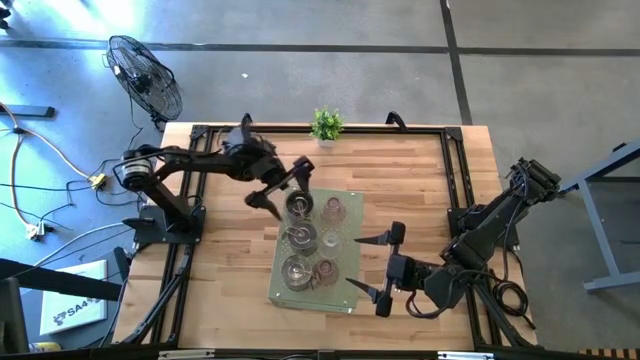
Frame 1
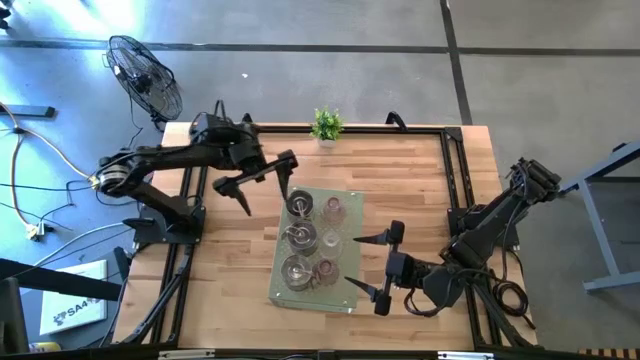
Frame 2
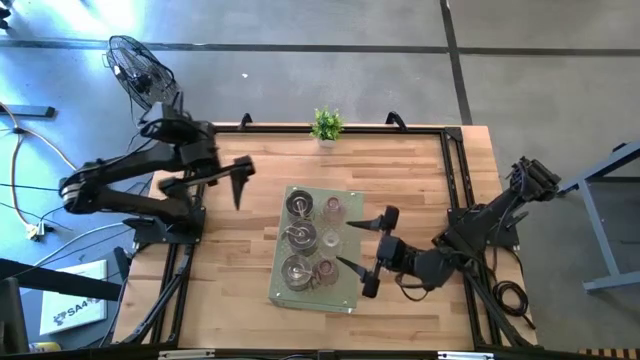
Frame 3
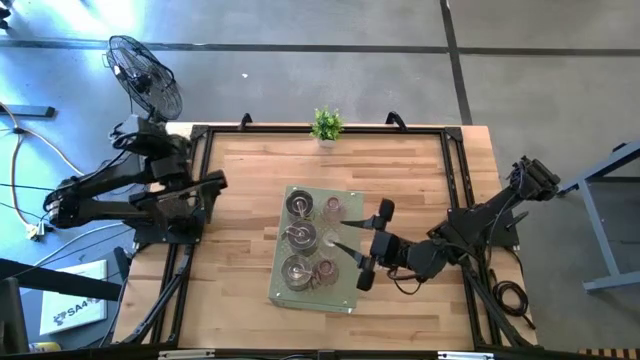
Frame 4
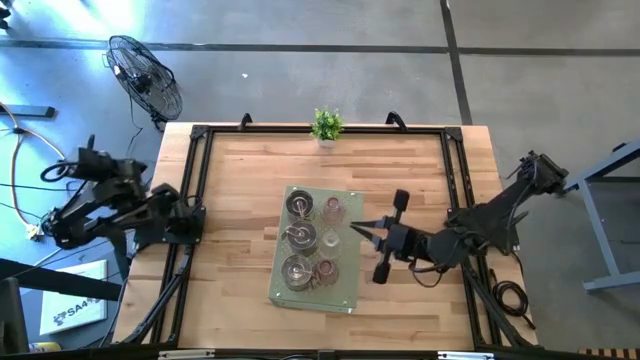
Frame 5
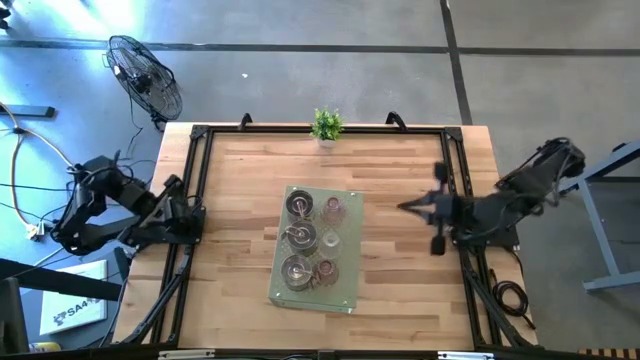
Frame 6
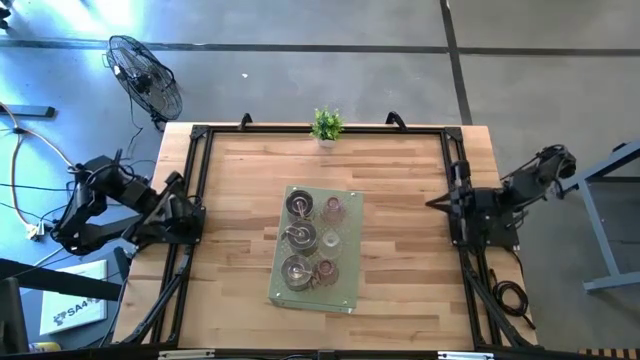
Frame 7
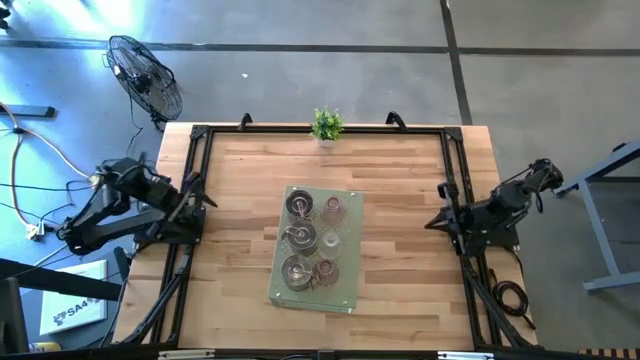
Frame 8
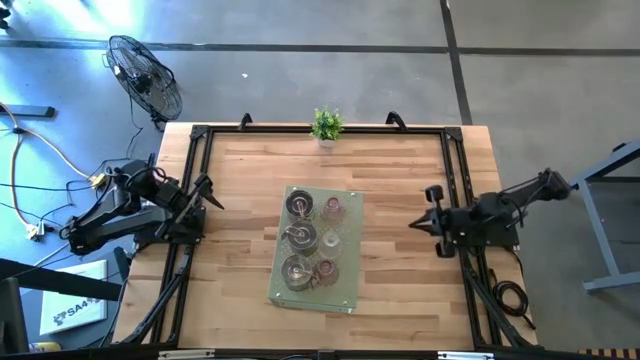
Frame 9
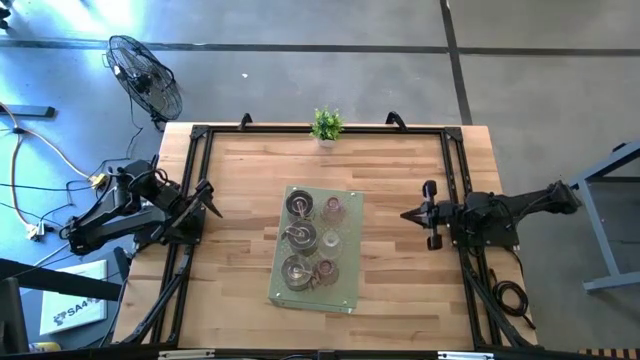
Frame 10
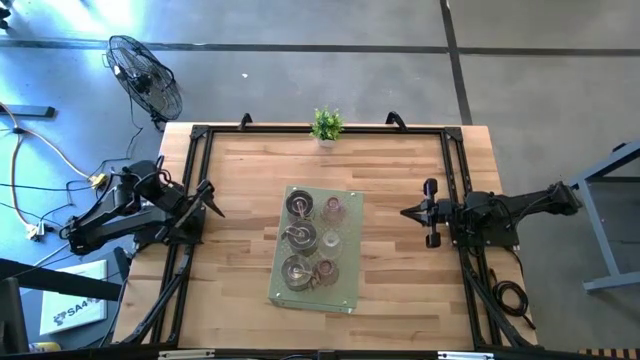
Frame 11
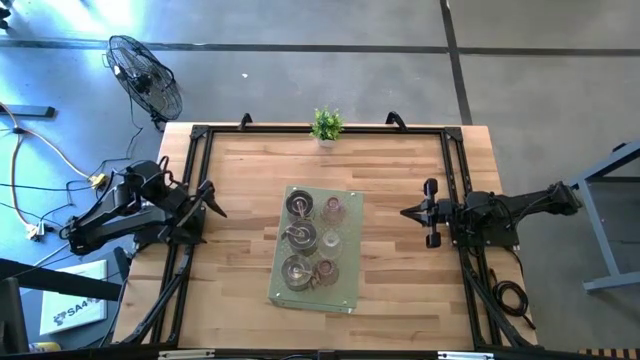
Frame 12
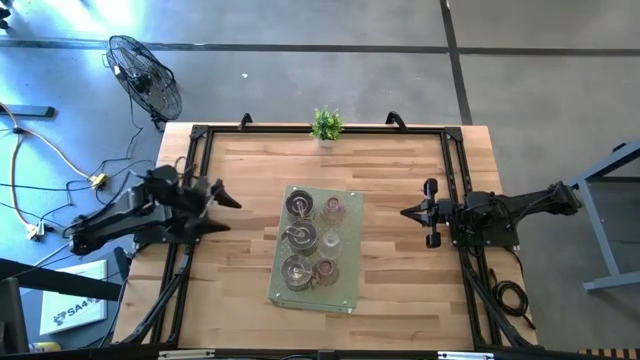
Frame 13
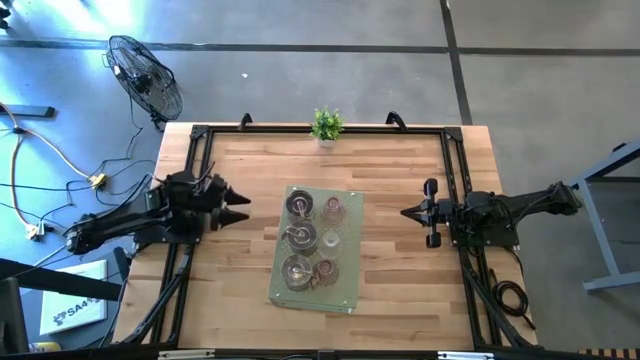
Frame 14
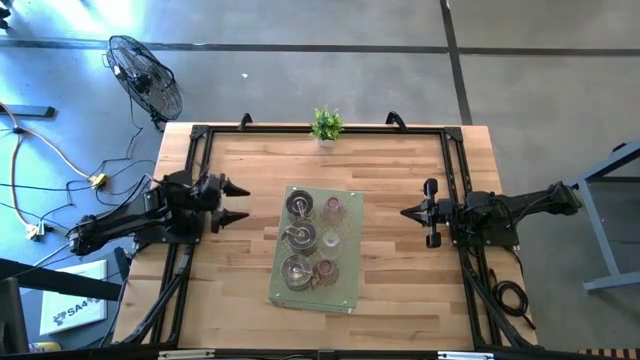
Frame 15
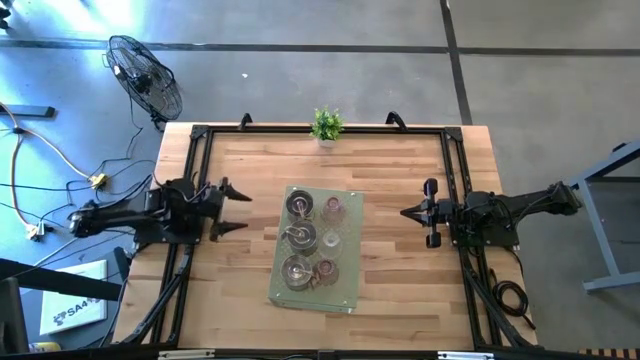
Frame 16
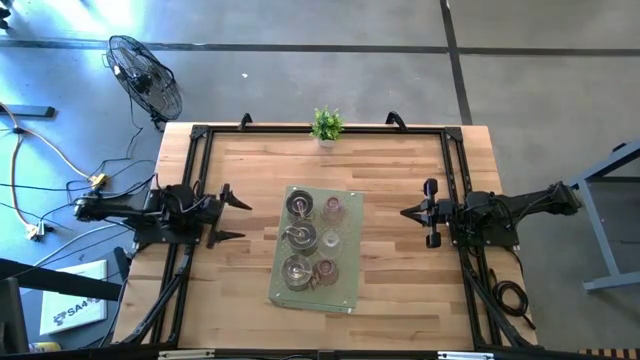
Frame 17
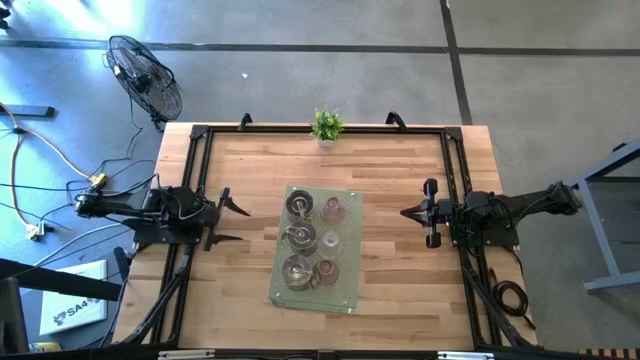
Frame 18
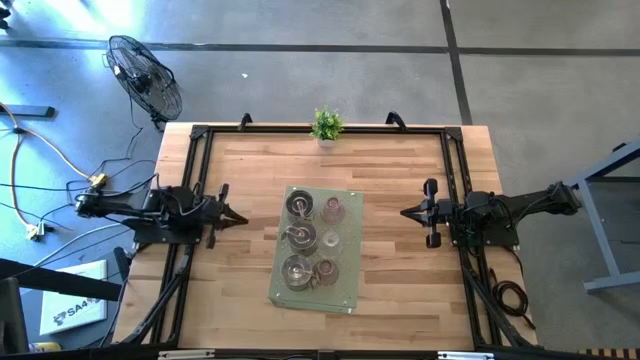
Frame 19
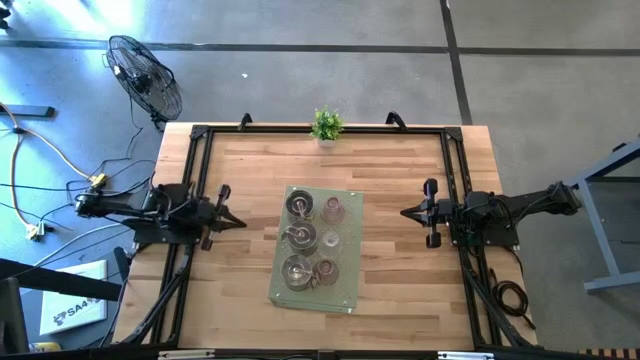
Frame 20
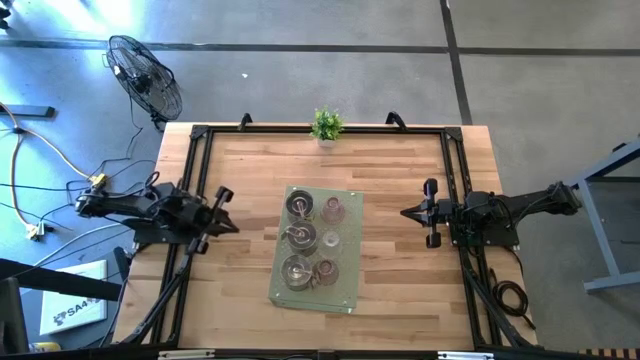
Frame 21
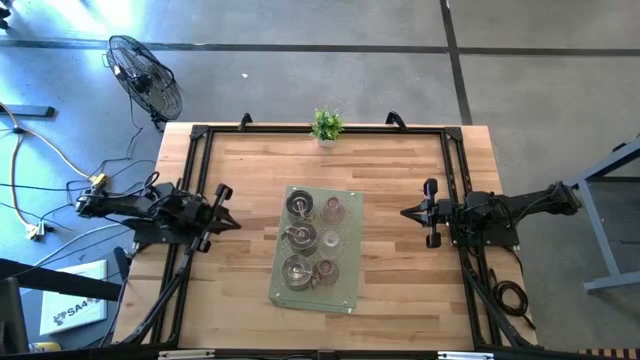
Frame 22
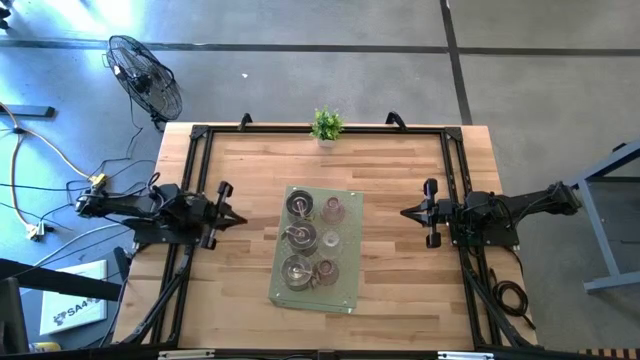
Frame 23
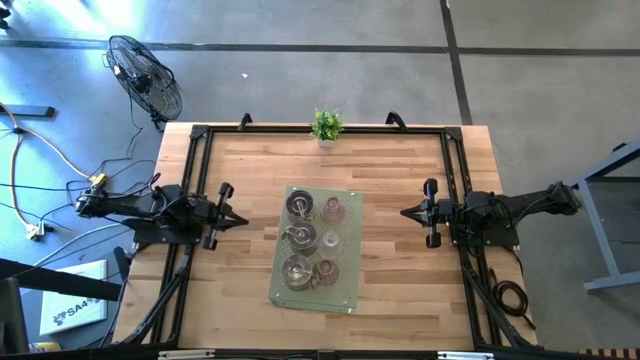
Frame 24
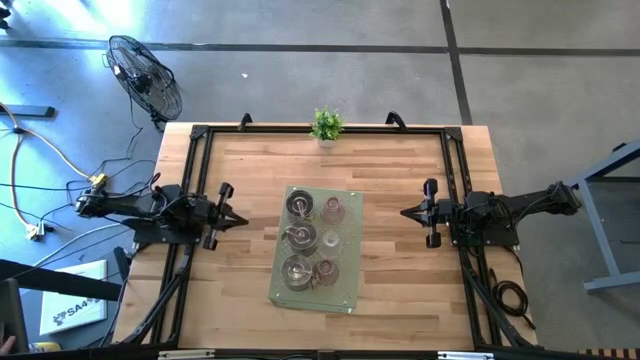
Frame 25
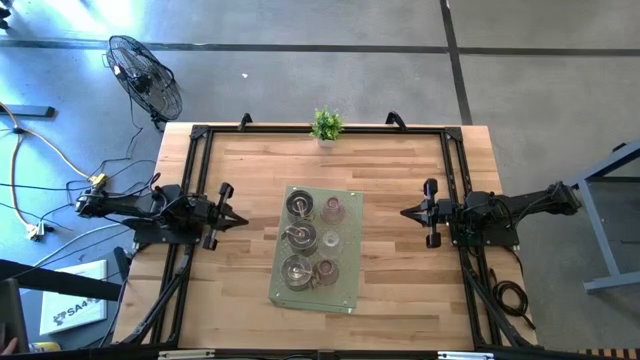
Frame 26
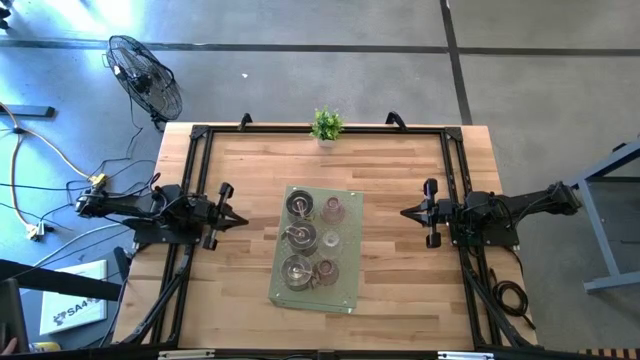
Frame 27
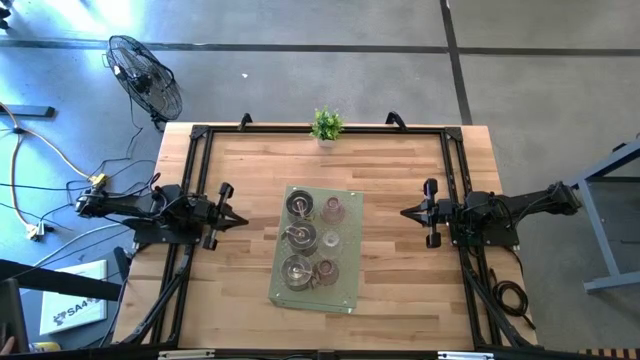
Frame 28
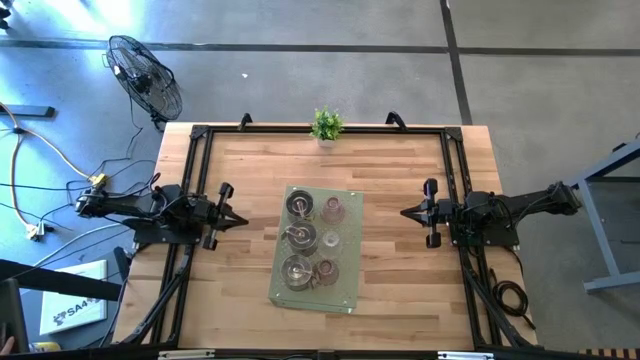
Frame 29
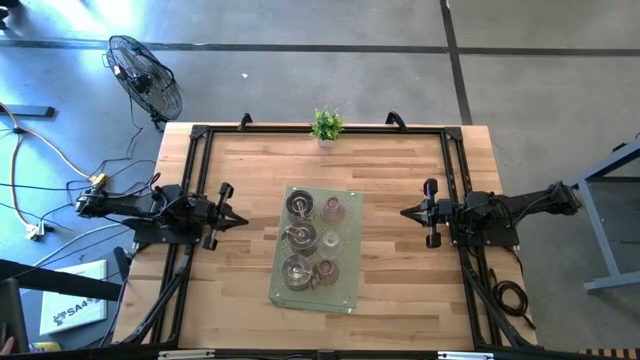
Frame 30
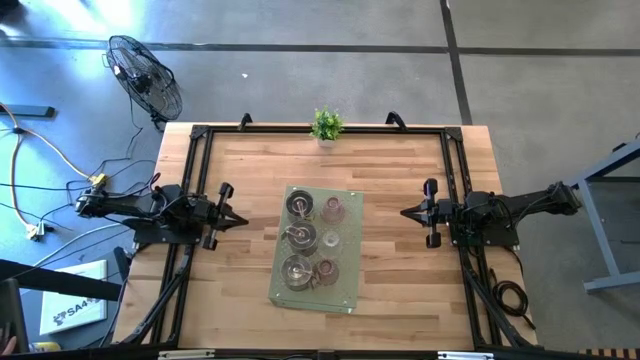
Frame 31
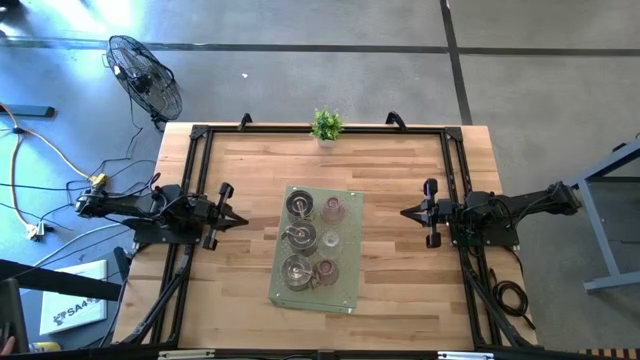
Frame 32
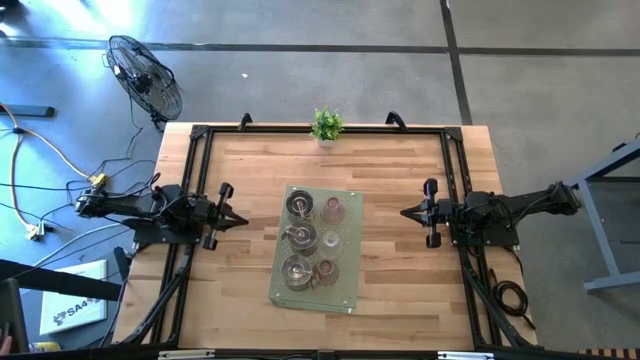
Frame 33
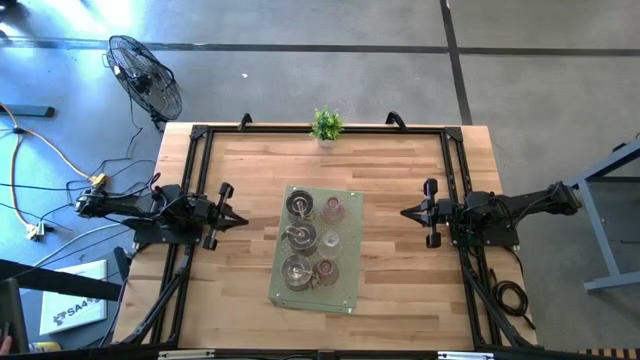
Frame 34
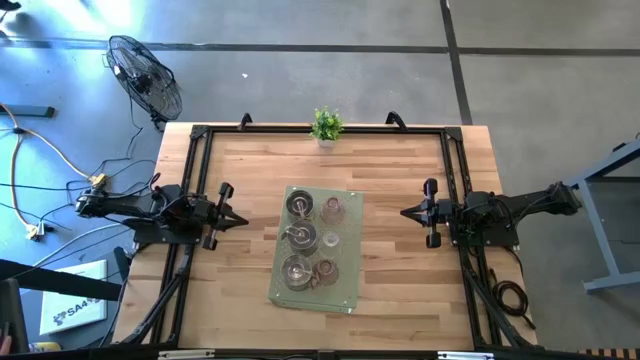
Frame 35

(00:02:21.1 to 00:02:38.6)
Task: Pick & Place candle stick holders
Return to Home Position

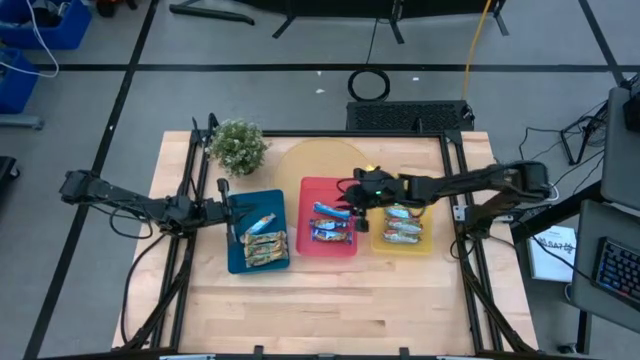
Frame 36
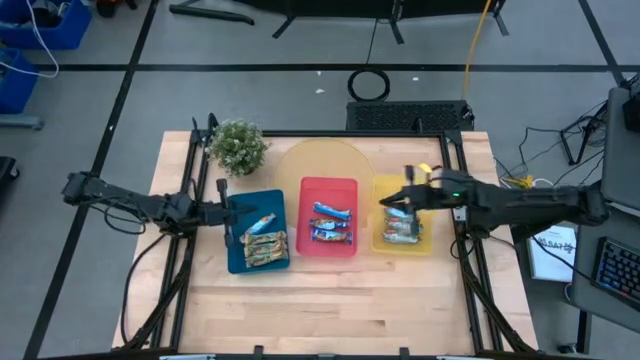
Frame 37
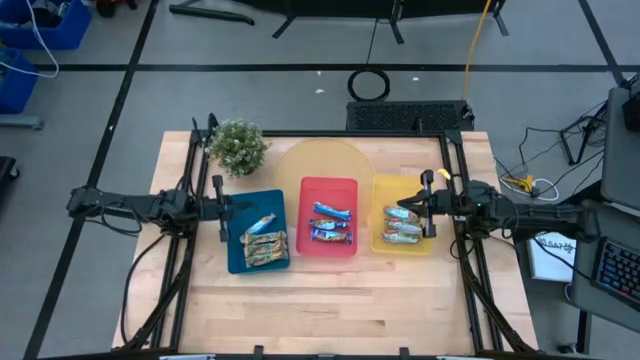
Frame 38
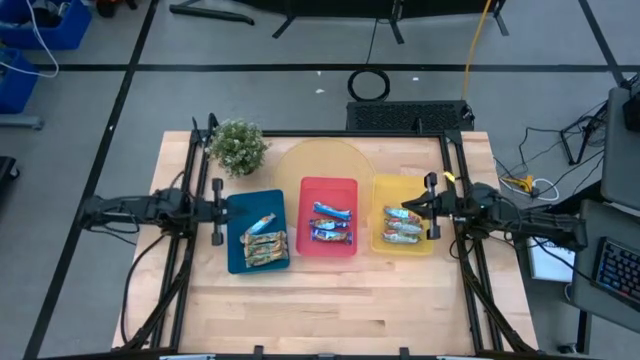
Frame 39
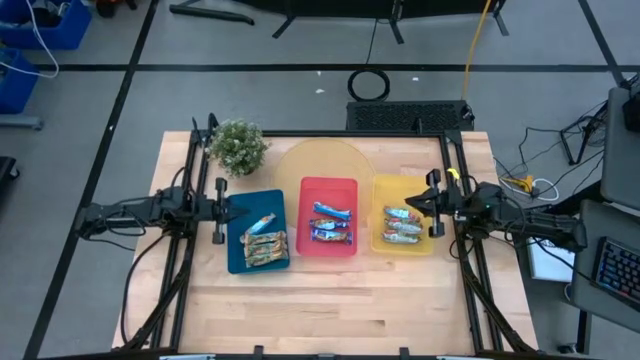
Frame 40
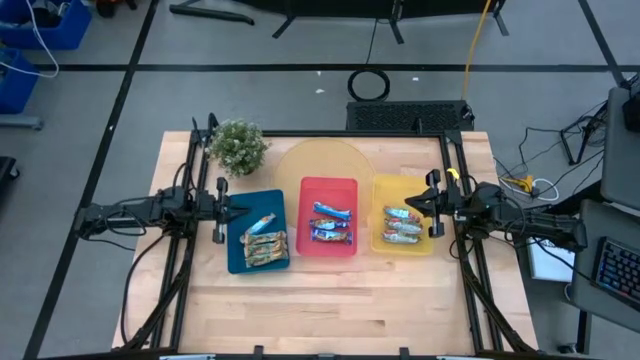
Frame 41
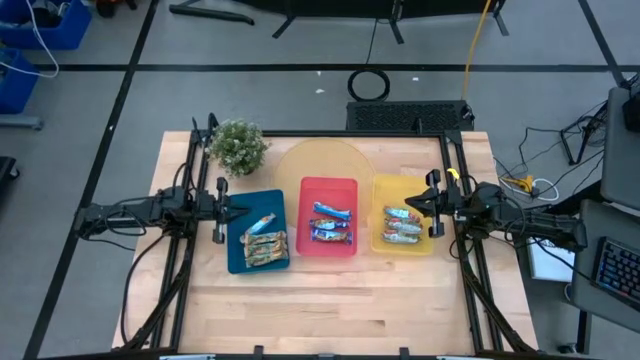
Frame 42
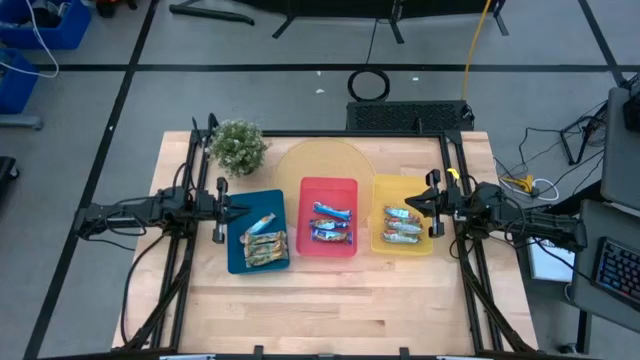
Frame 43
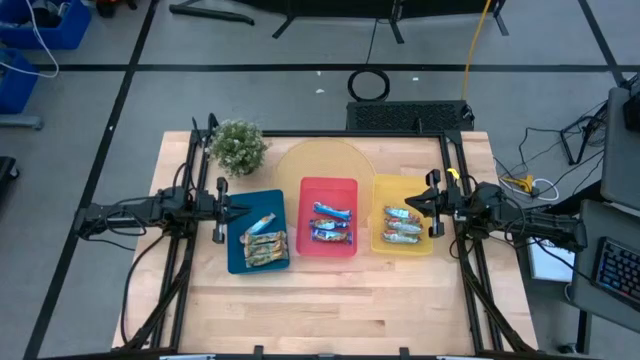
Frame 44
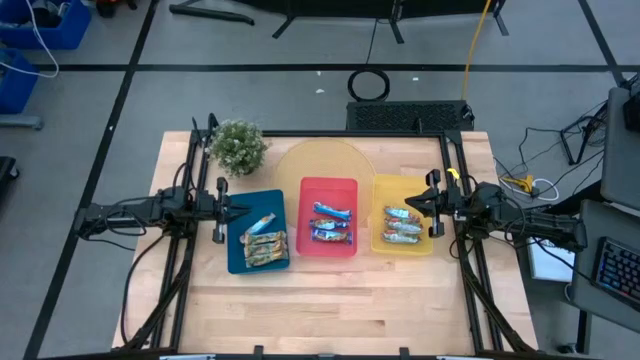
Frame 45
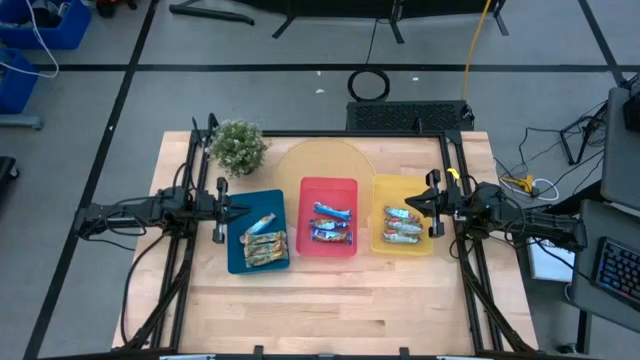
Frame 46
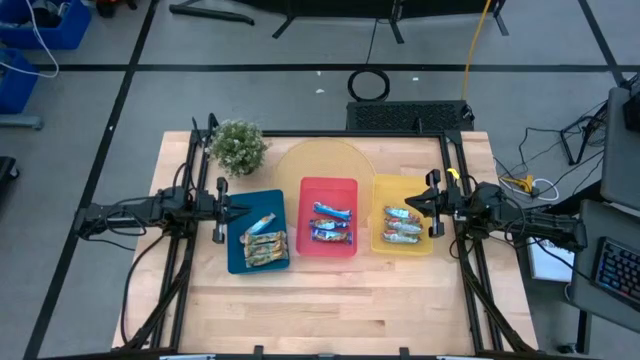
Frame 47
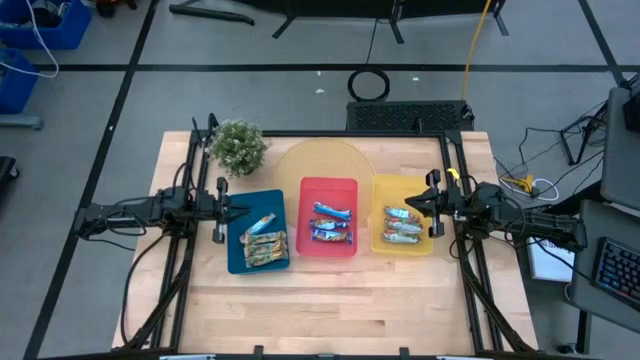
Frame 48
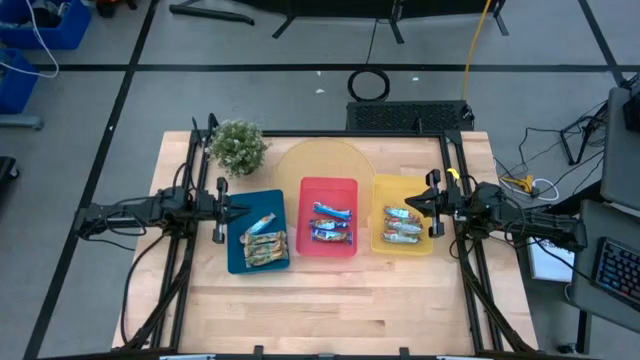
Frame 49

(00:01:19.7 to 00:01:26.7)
Task: Pick and place Granola Bars by type
Return to Home Position
